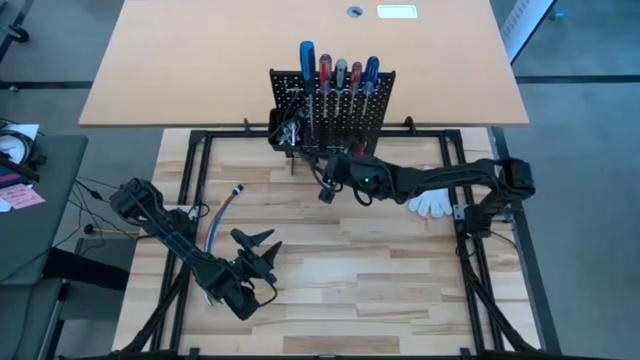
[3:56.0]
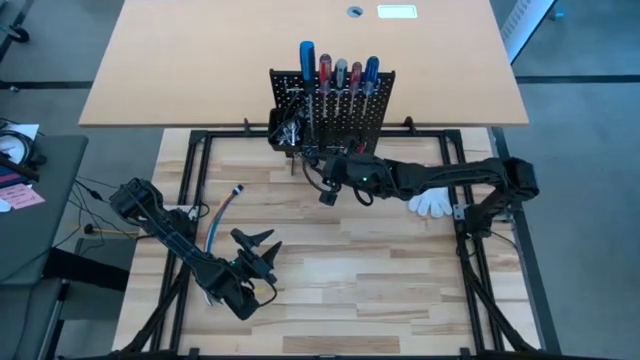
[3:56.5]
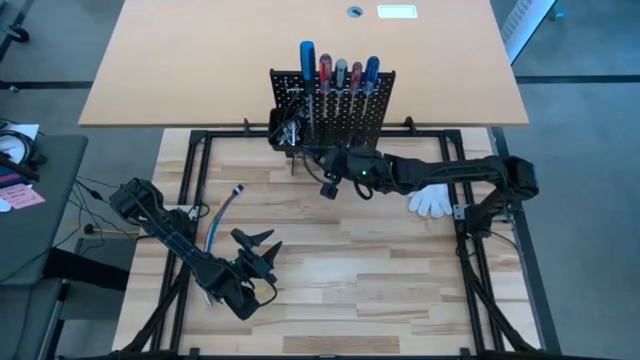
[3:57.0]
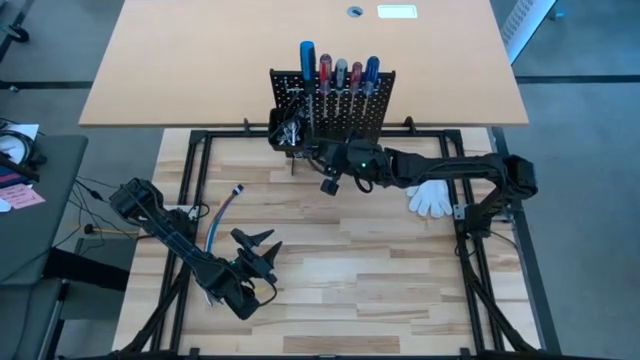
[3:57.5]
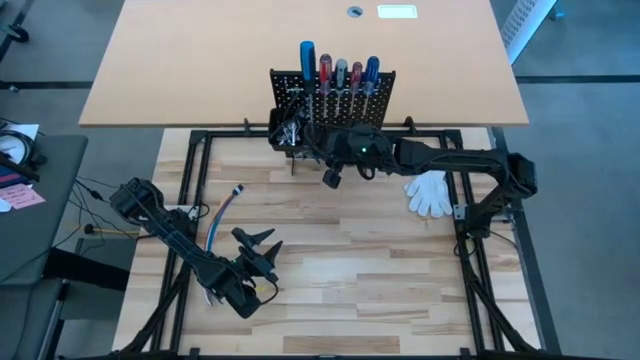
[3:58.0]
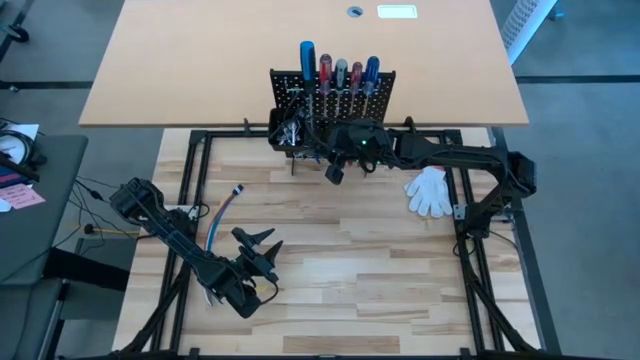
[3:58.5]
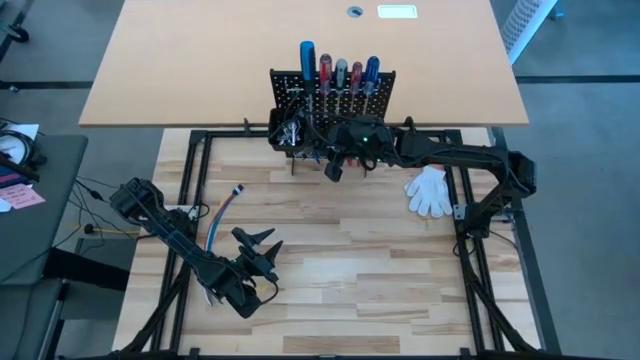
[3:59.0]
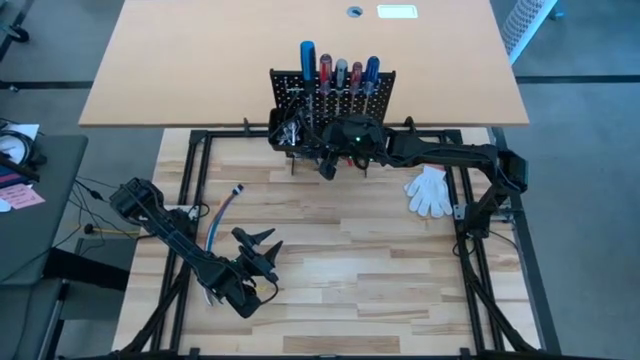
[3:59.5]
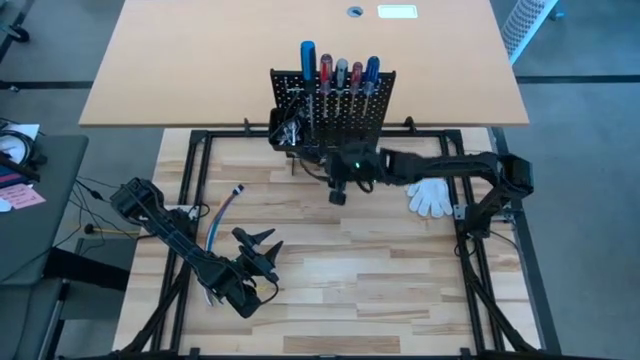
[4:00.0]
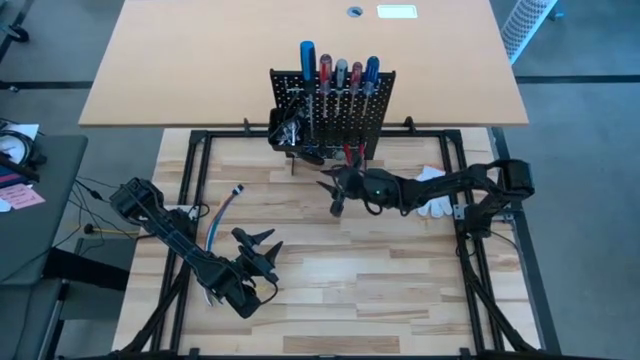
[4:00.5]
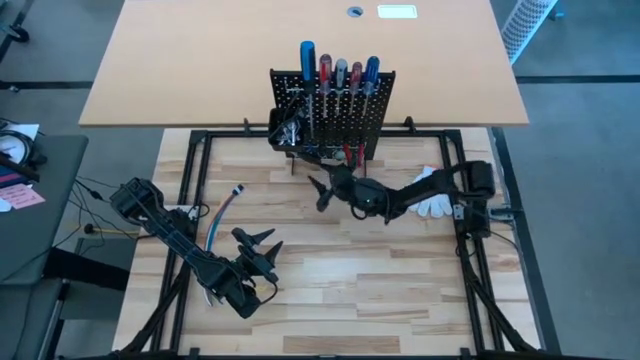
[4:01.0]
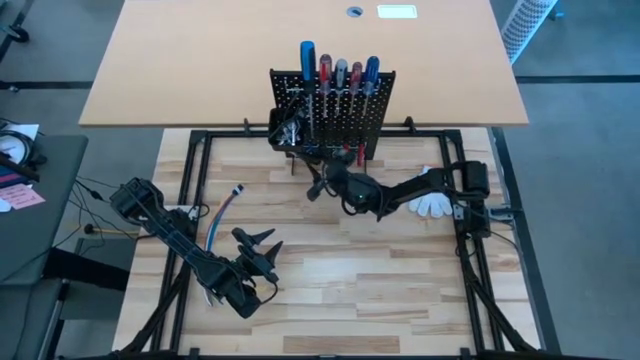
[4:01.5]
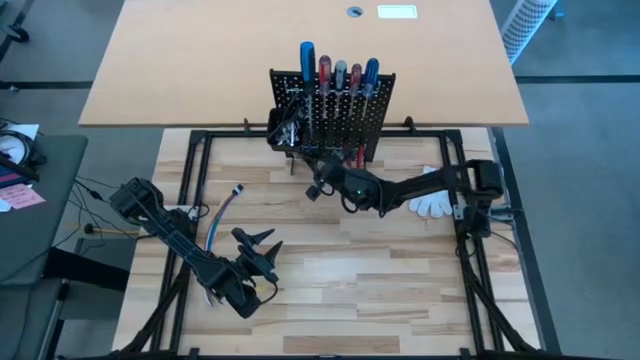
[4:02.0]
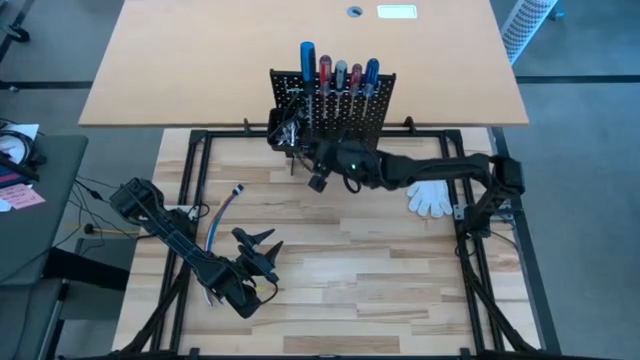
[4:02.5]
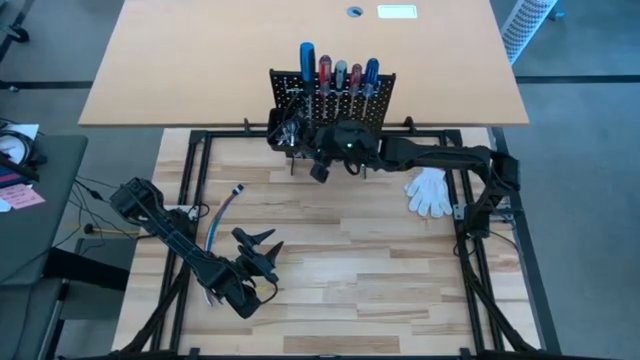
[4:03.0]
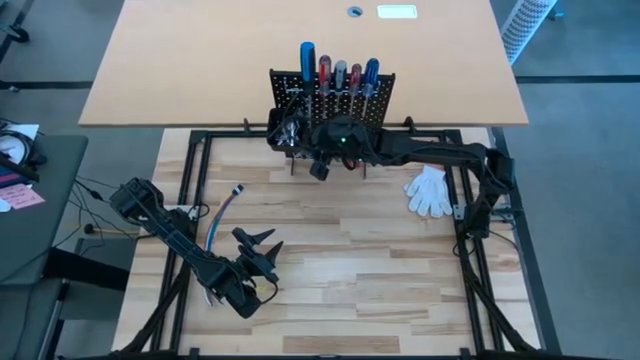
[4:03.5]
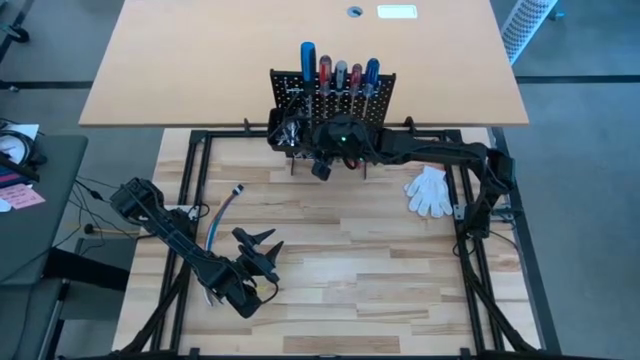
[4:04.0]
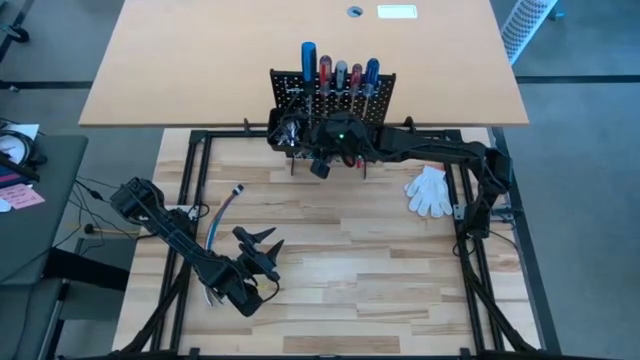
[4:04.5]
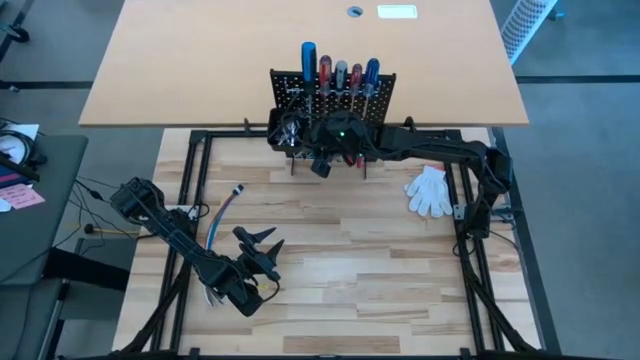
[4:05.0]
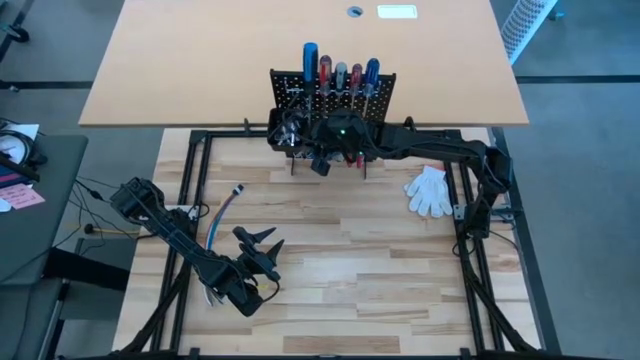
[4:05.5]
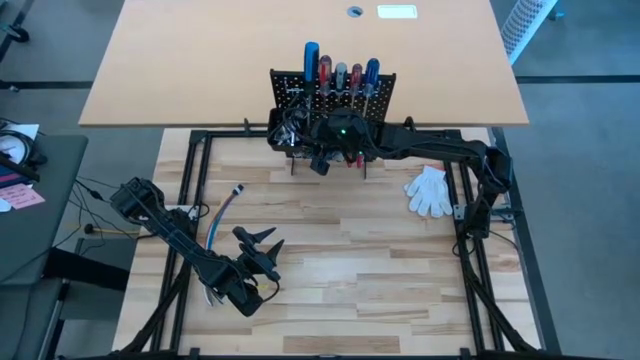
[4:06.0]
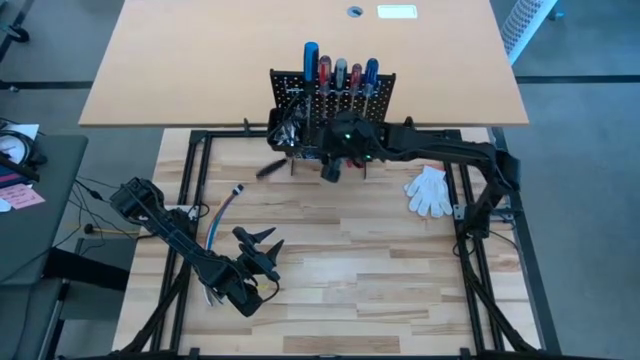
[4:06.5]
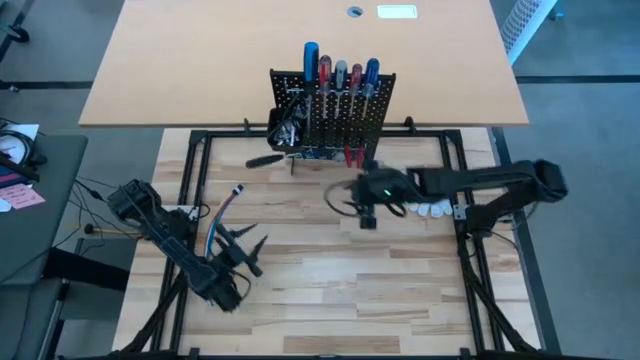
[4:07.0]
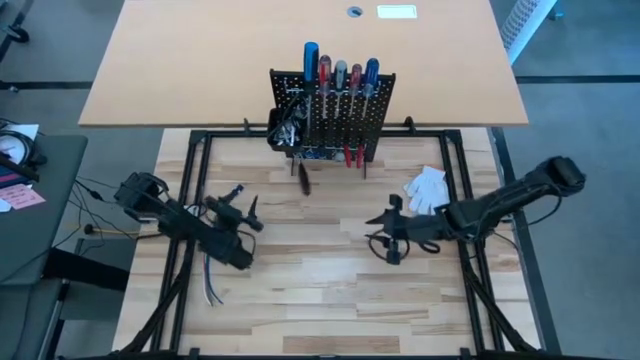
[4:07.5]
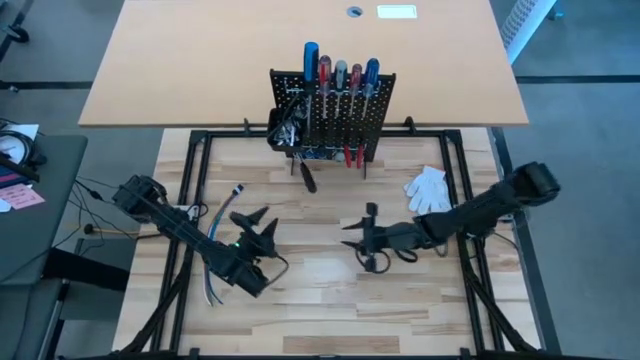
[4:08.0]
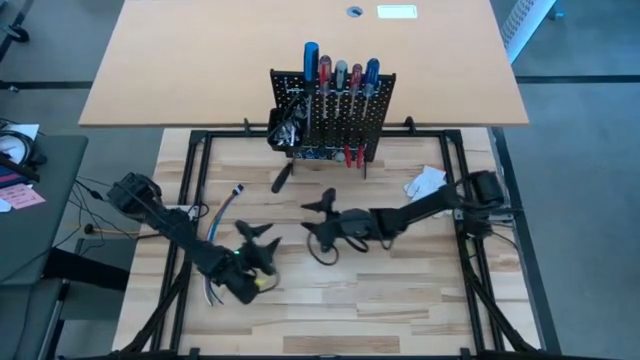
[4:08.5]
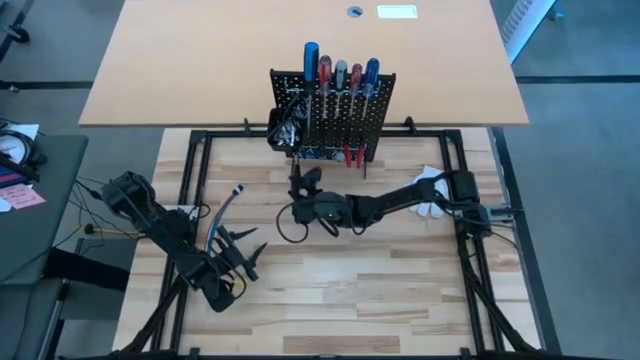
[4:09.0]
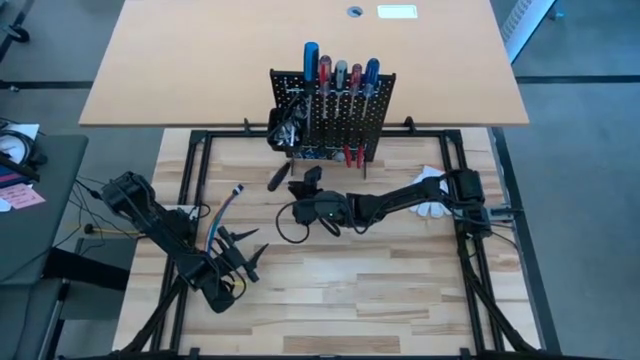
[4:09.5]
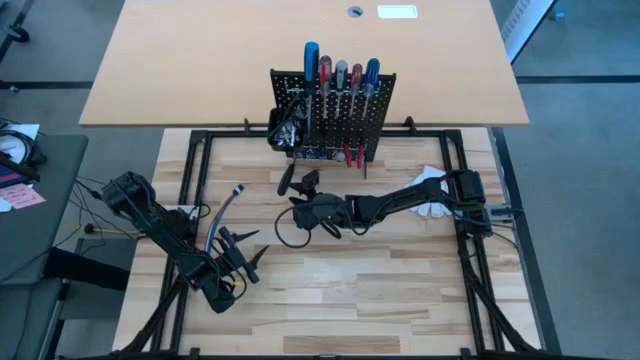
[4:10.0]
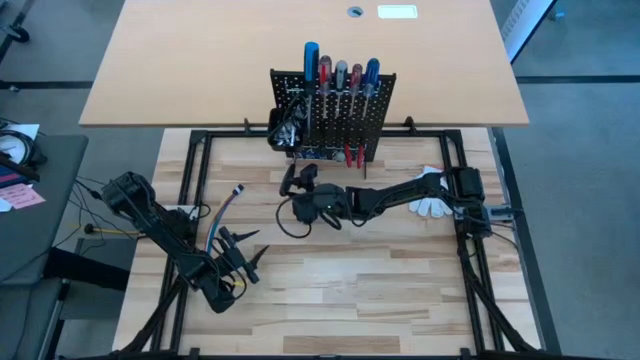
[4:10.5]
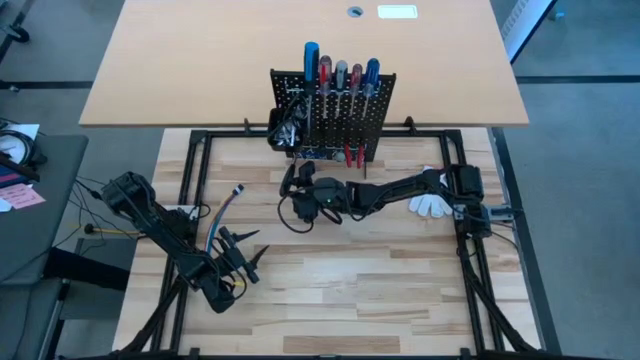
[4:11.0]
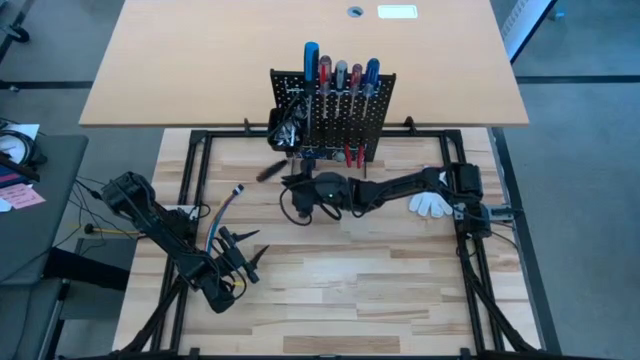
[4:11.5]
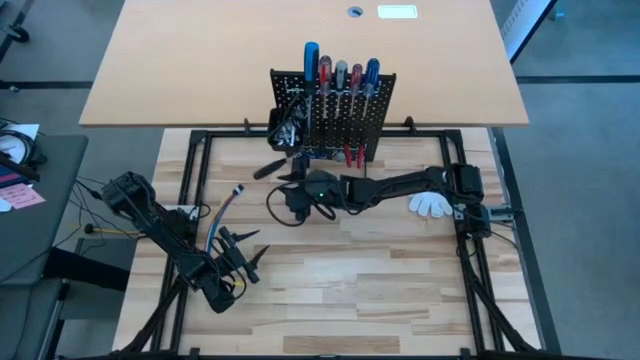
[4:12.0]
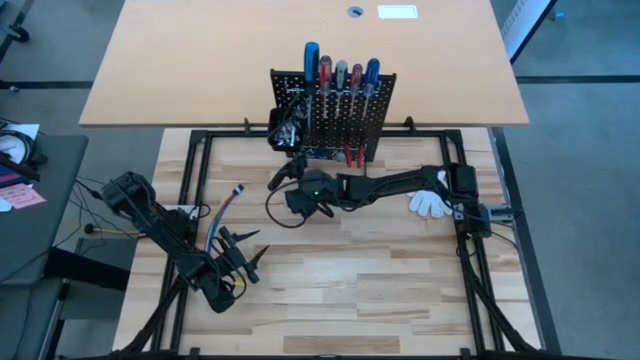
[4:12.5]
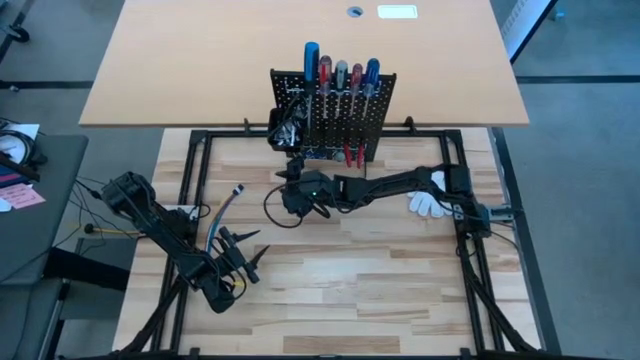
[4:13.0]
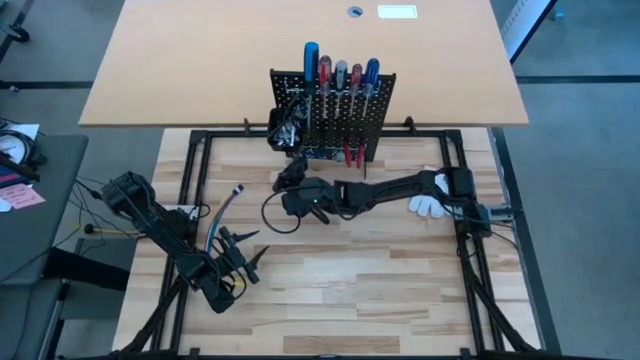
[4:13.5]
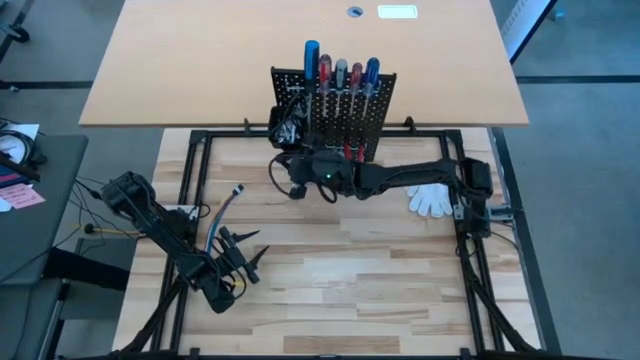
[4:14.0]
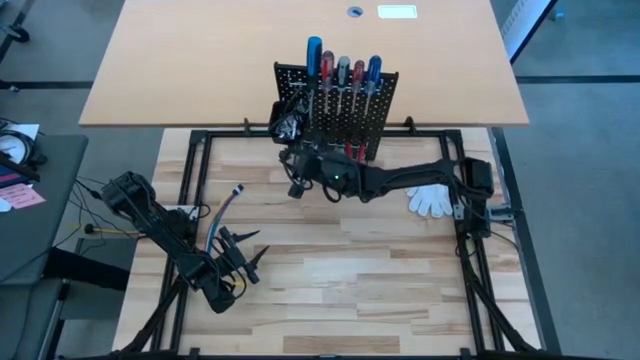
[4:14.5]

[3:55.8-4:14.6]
Task: Hang tools onto peg board
Hang the black screwdriver on the black pegboard
